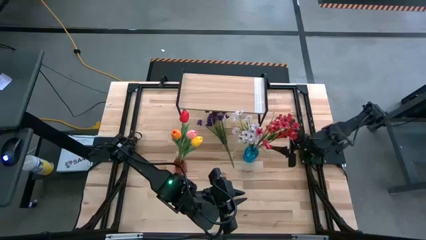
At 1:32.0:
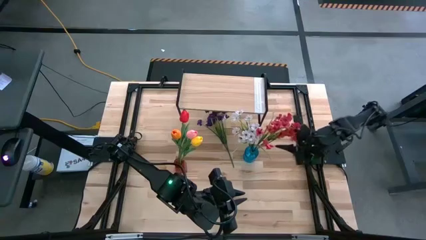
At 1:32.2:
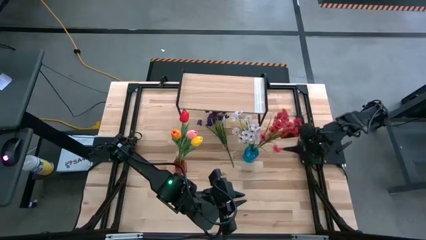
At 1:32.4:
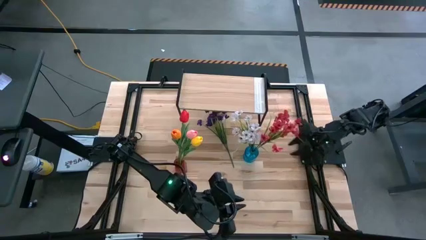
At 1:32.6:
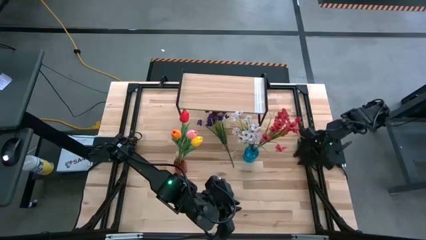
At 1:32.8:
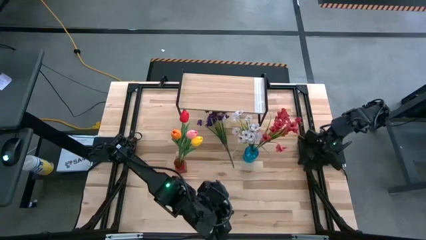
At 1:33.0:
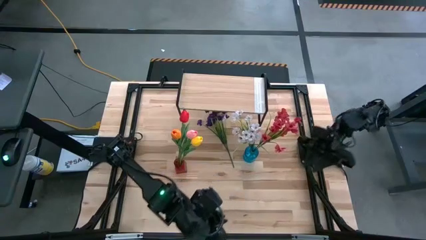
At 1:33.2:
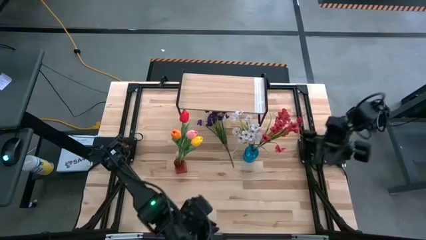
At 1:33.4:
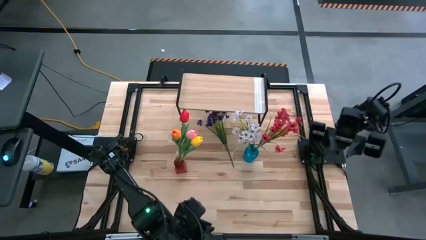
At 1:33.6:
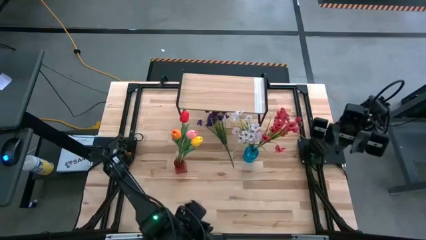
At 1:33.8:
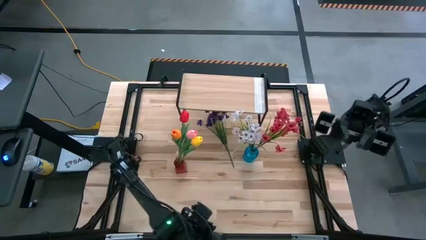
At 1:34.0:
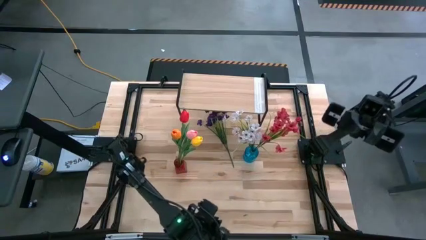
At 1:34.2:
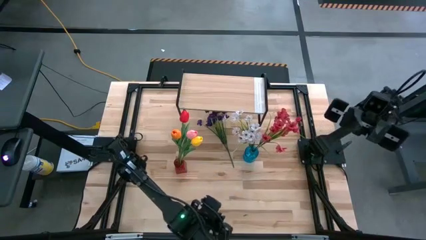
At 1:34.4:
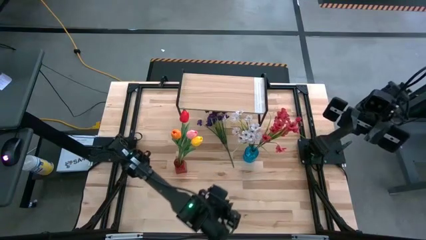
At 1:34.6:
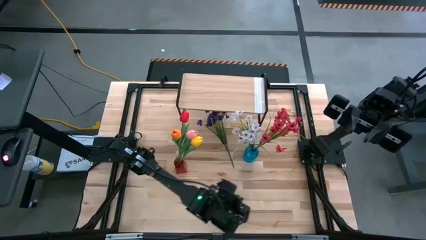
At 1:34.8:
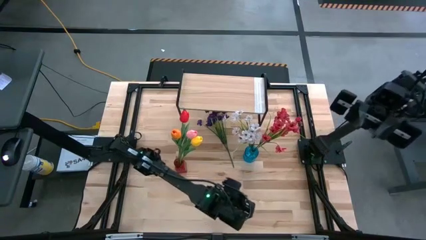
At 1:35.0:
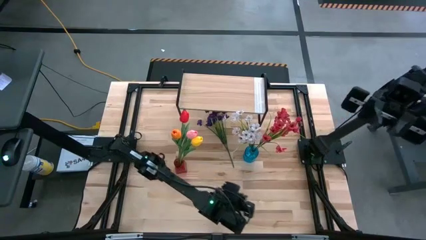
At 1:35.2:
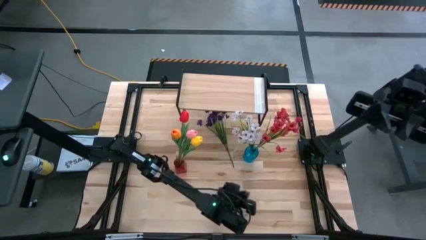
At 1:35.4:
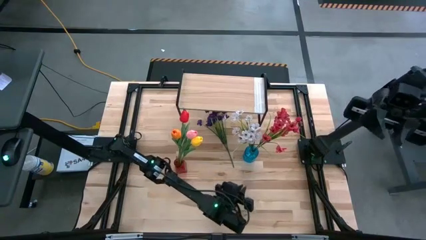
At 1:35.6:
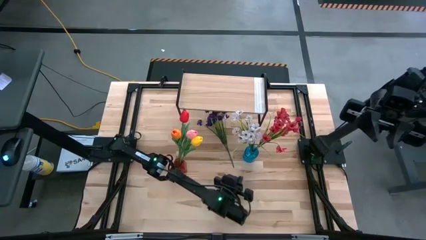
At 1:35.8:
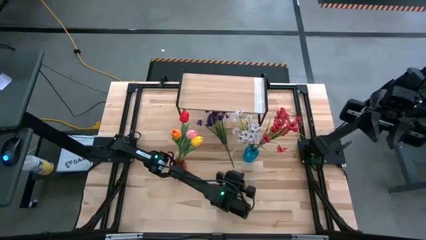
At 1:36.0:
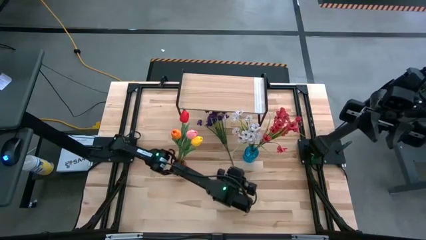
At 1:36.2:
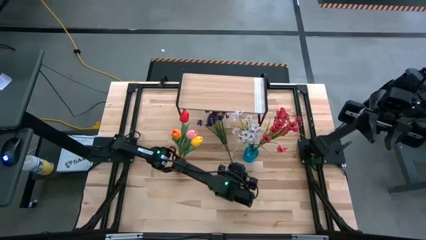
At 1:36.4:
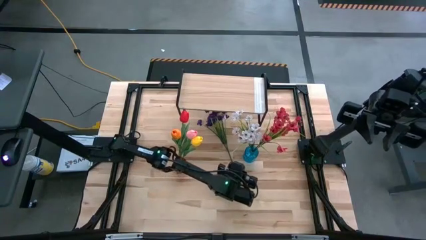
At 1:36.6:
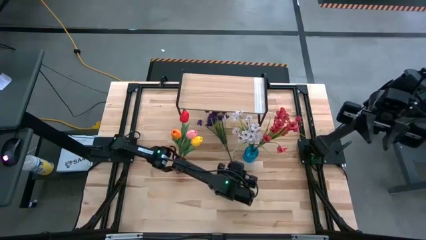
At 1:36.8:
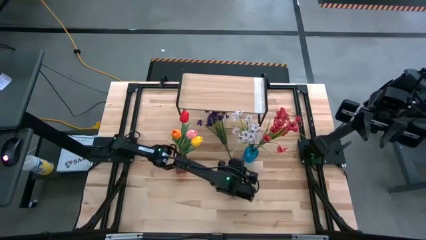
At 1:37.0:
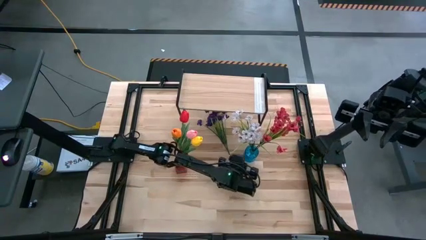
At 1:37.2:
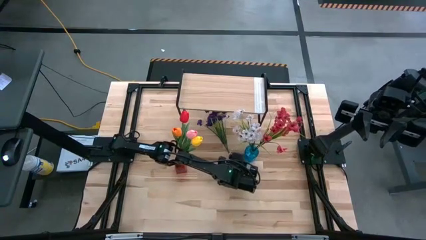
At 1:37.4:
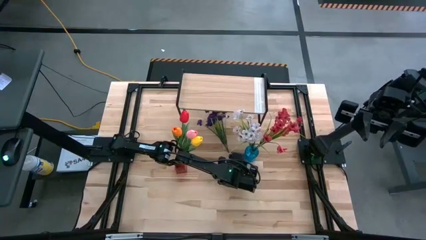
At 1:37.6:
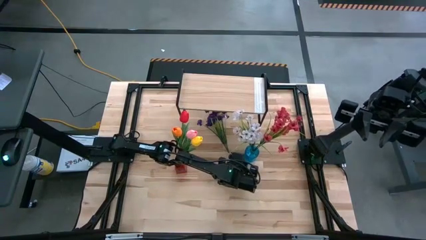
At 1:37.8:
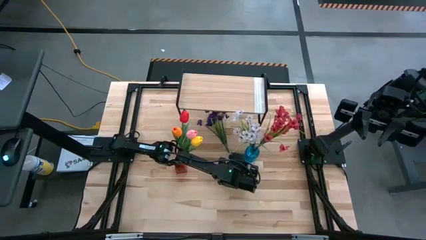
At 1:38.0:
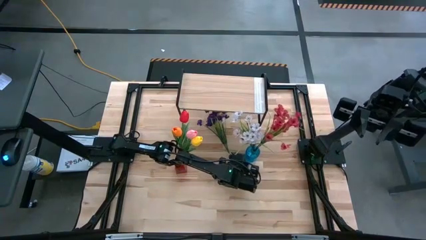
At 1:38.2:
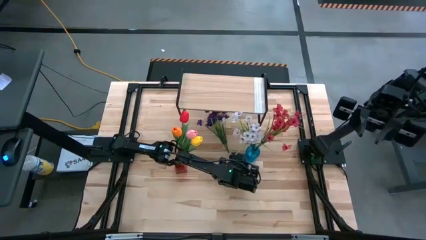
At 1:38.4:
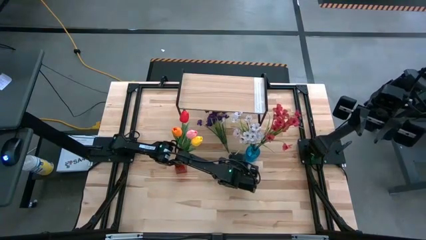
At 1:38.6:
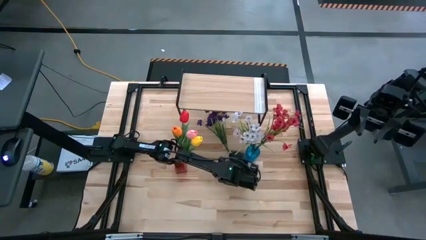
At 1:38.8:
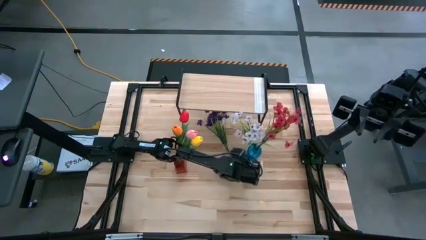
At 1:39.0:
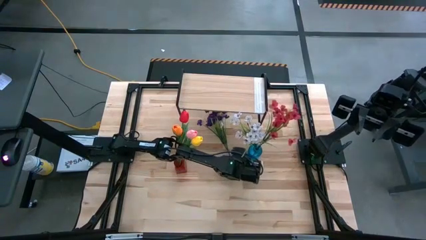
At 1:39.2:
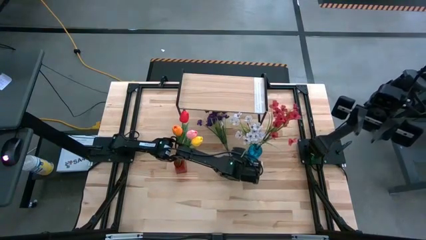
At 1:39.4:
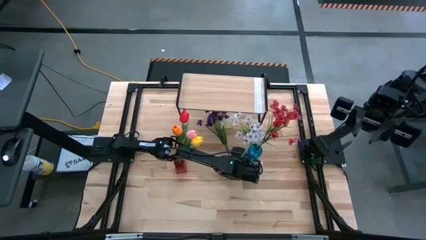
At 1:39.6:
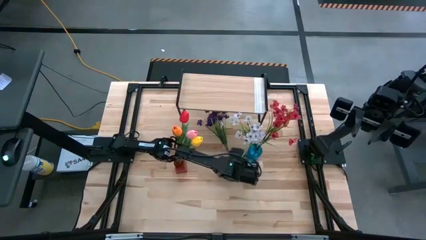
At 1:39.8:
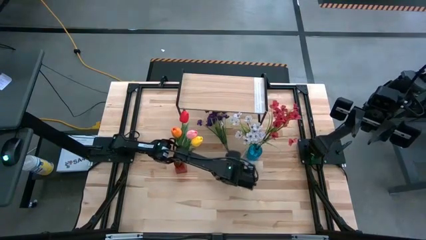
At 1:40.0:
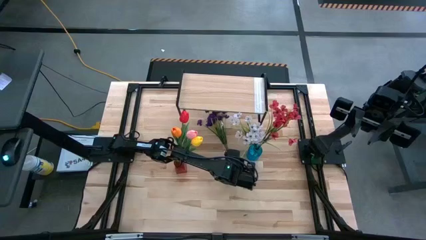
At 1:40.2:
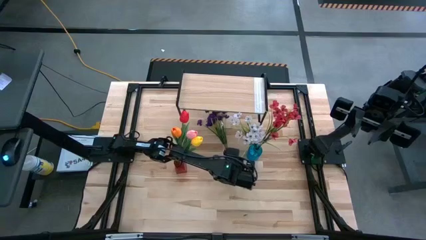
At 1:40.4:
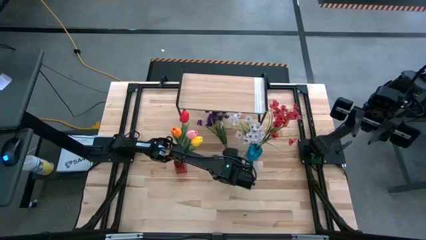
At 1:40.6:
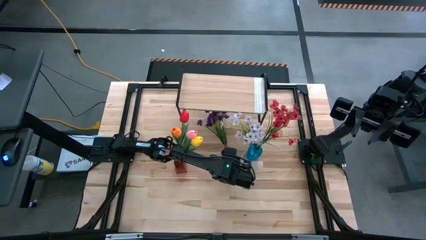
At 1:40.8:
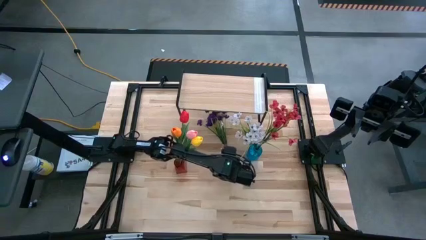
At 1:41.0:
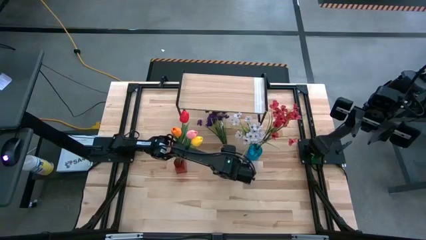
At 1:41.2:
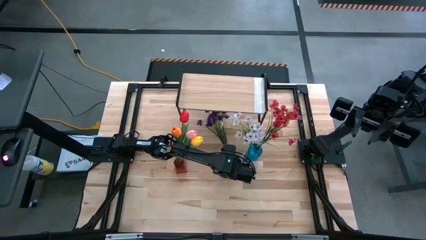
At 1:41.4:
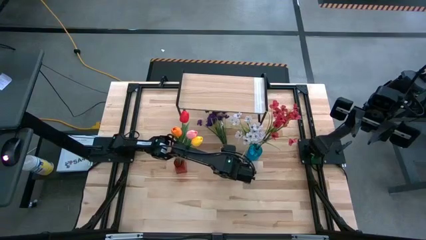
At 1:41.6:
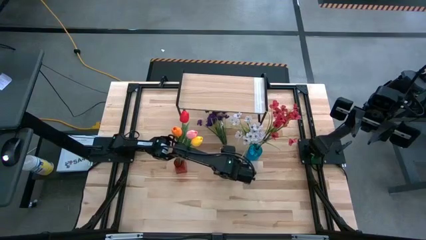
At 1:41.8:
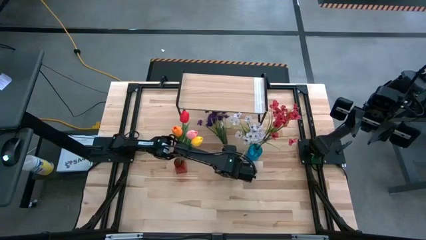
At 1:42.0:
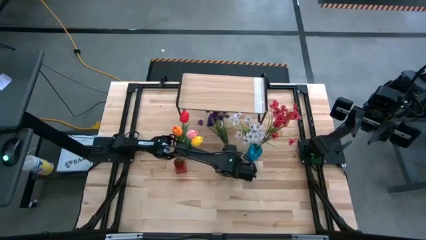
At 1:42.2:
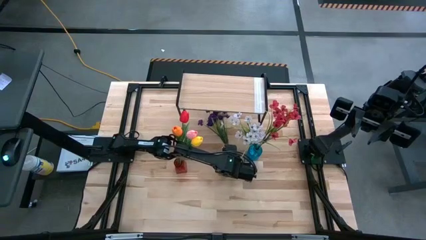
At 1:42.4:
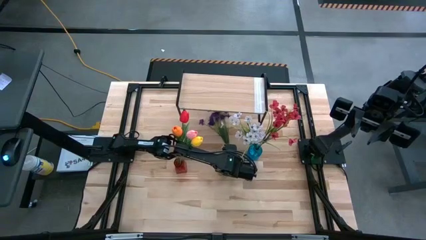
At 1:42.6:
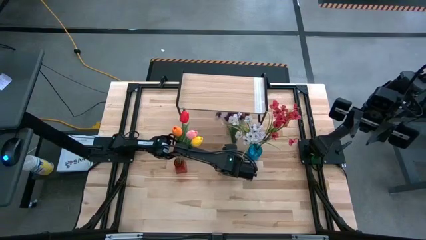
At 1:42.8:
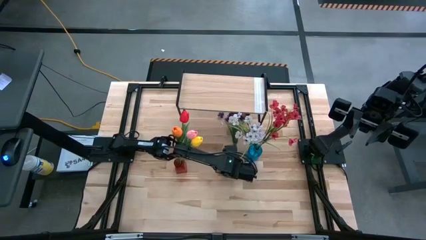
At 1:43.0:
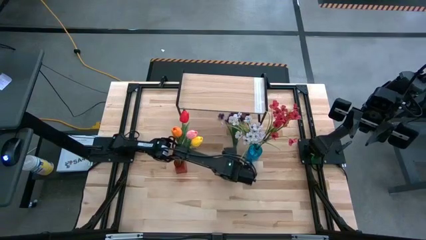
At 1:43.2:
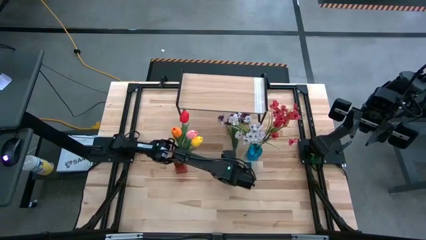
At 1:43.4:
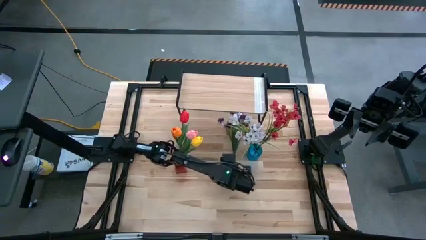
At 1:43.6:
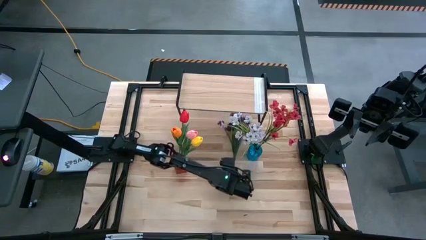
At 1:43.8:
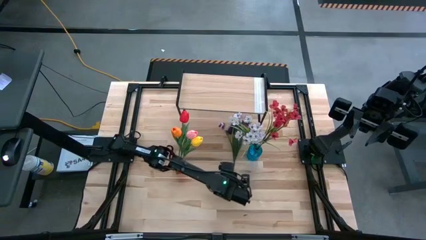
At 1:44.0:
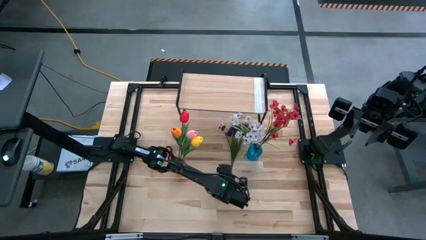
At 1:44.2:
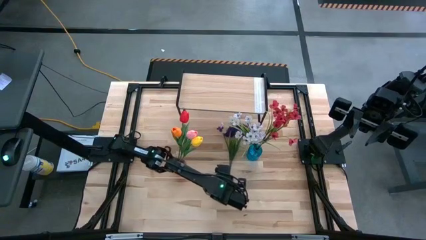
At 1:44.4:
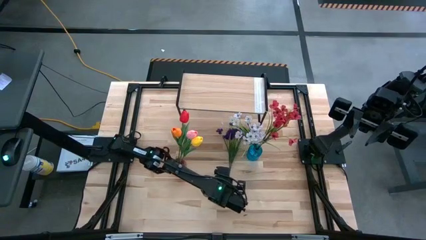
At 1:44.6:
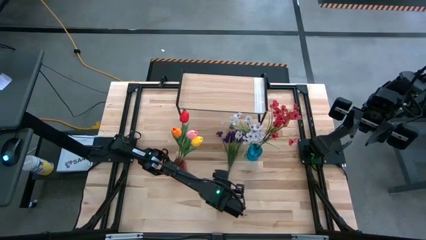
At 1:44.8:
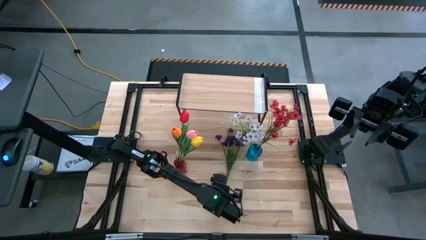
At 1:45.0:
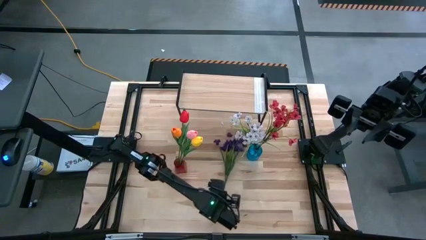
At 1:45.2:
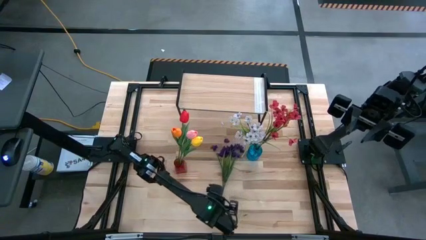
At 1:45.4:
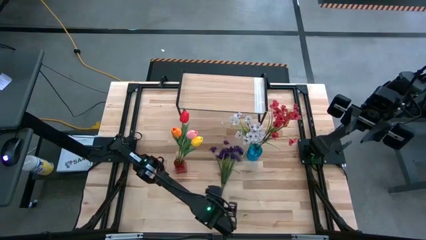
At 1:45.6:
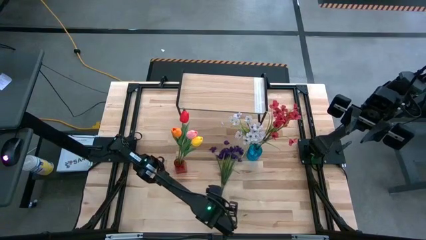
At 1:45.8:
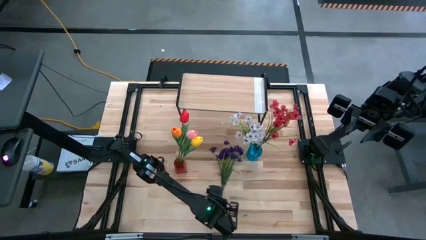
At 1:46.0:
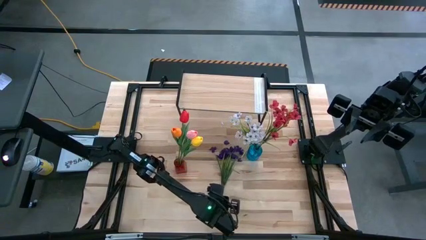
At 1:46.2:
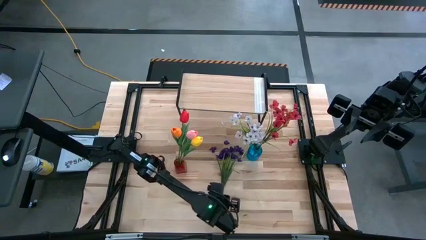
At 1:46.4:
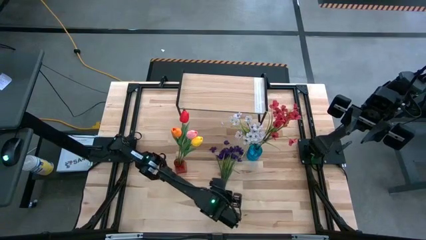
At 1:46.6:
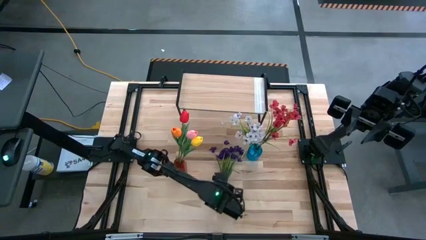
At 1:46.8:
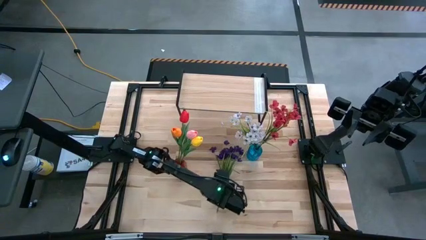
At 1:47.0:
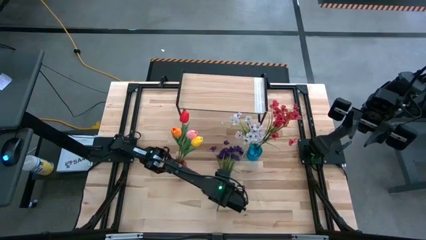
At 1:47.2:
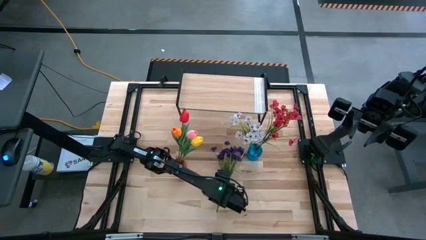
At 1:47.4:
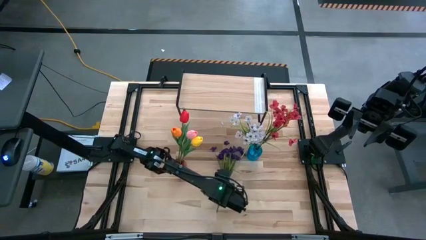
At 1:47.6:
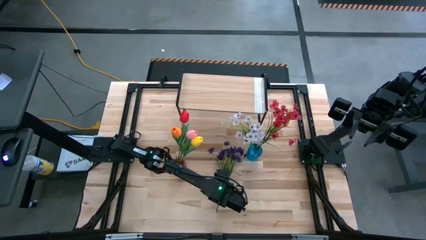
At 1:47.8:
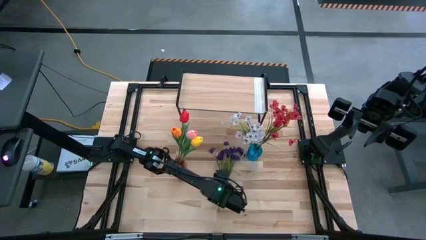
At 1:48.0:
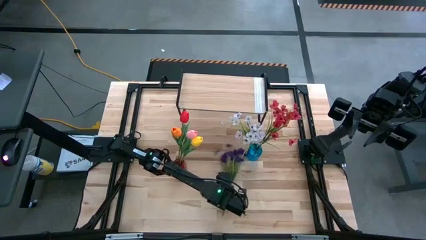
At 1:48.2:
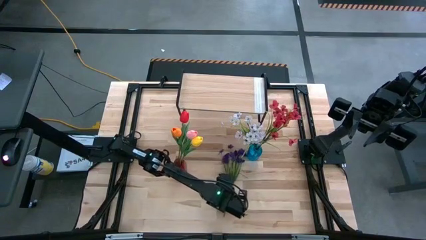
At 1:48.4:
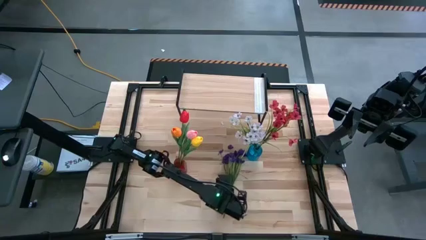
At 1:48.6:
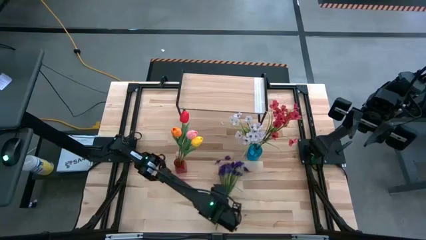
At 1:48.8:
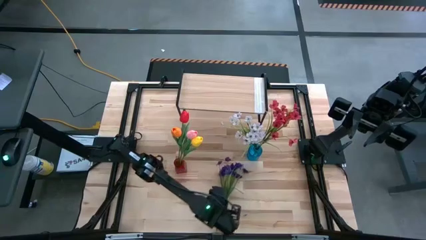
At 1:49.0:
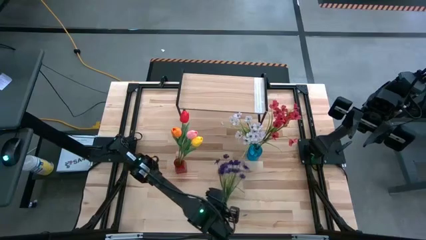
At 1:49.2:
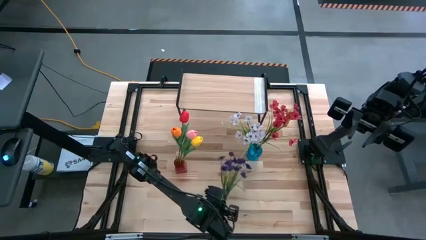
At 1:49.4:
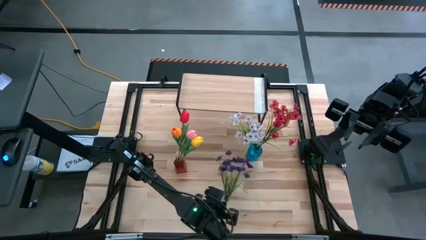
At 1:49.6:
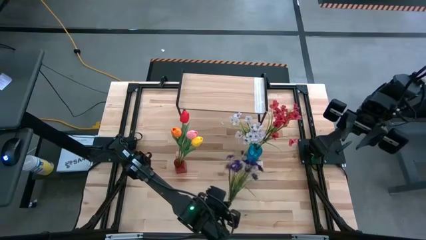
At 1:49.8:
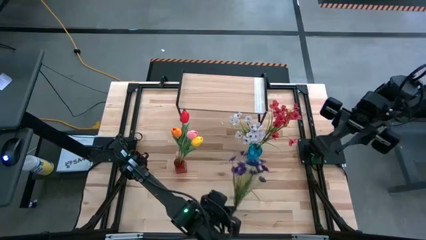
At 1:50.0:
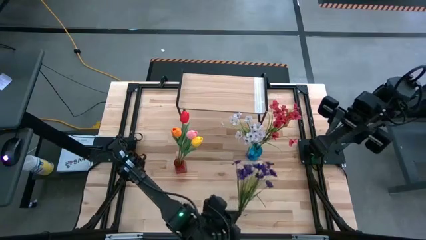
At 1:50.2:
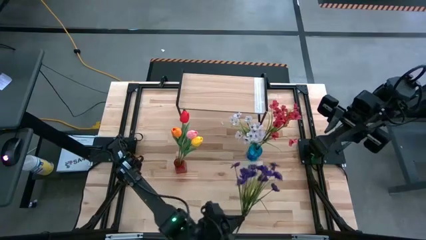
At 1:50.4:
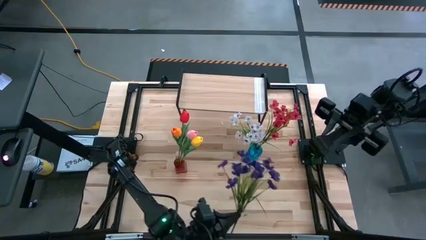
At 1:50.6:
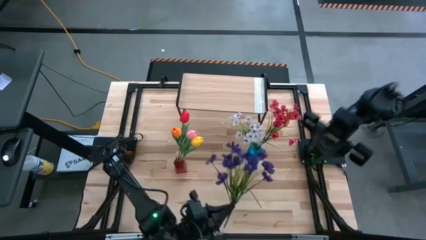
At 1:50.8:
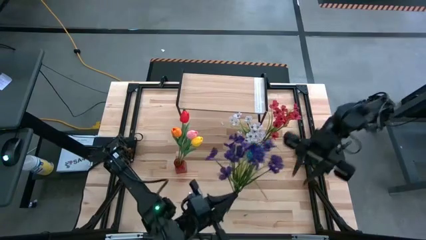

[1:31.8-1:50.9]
Task: Pick and place flowers into a vace then onto a shelf
Put the violet flowers into the blue vase
